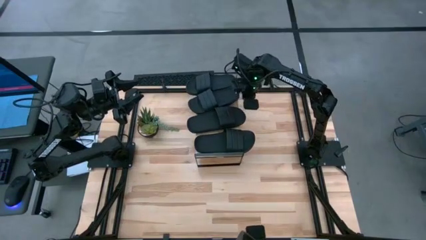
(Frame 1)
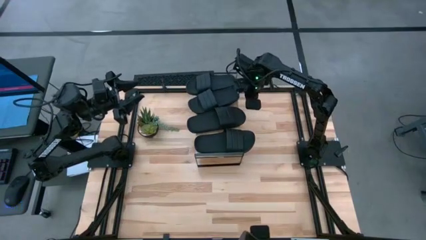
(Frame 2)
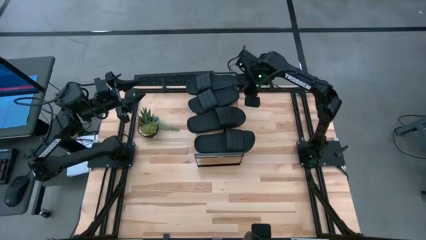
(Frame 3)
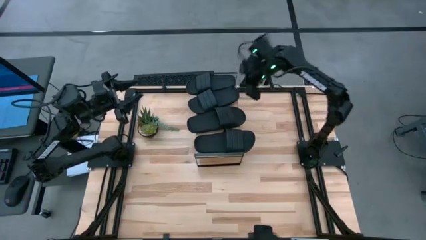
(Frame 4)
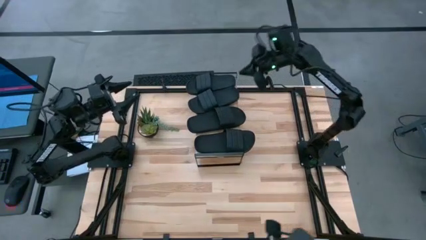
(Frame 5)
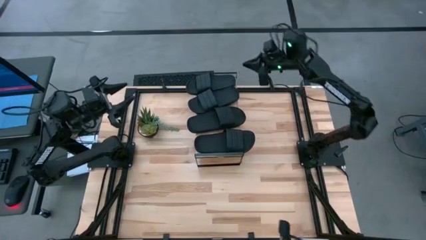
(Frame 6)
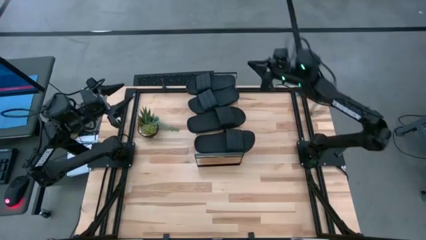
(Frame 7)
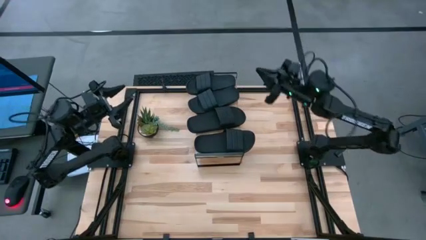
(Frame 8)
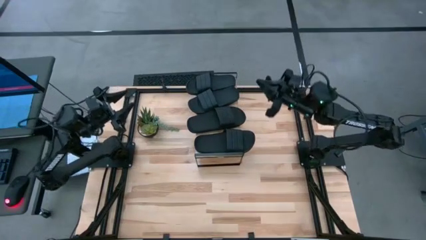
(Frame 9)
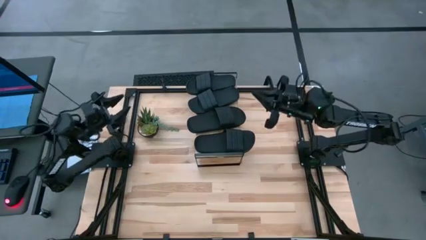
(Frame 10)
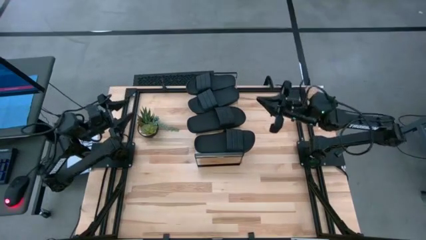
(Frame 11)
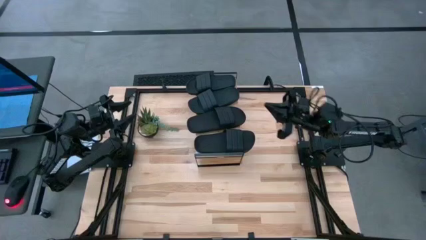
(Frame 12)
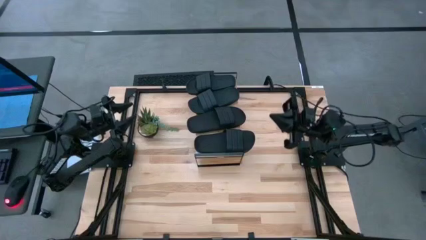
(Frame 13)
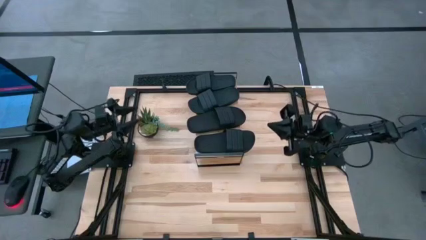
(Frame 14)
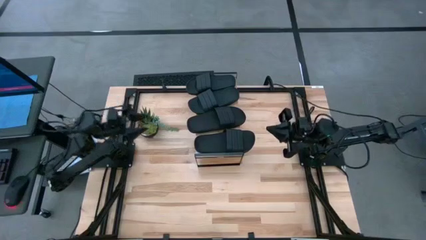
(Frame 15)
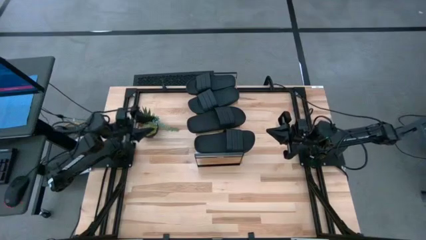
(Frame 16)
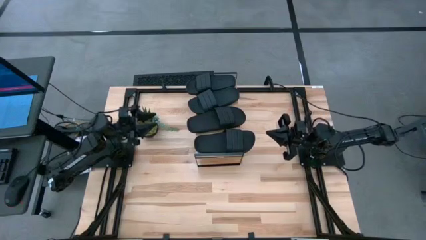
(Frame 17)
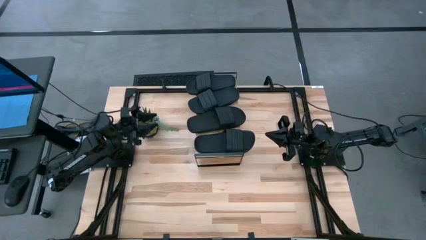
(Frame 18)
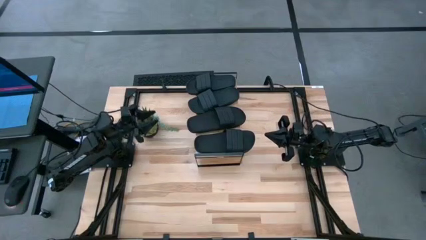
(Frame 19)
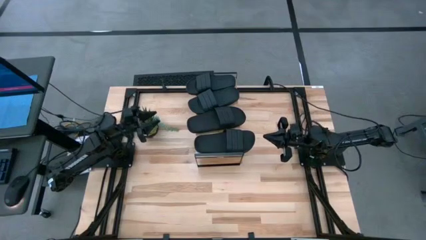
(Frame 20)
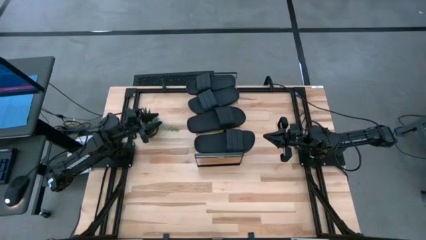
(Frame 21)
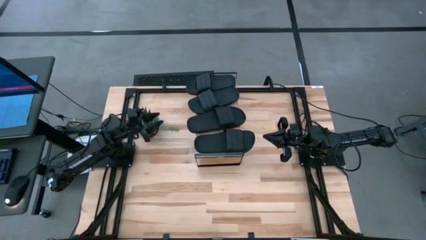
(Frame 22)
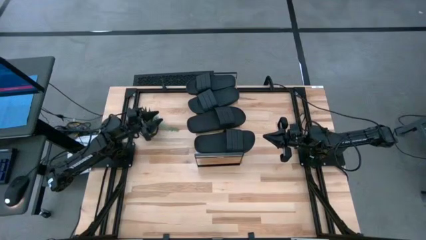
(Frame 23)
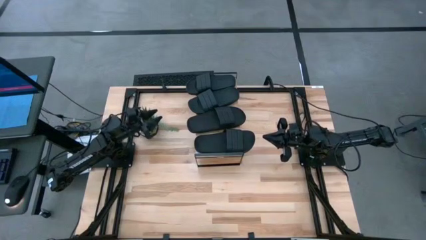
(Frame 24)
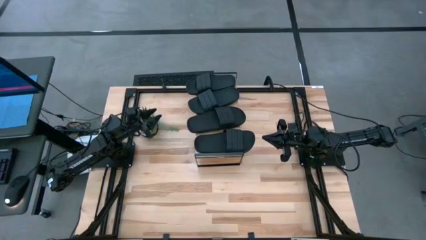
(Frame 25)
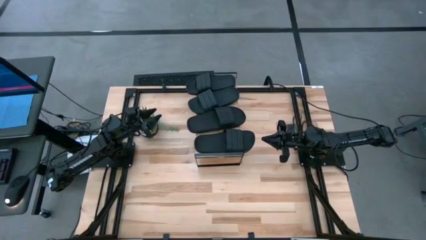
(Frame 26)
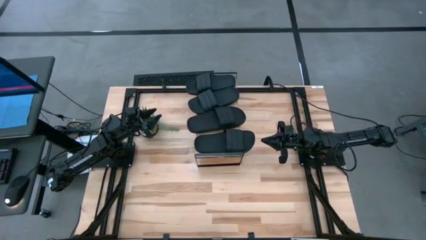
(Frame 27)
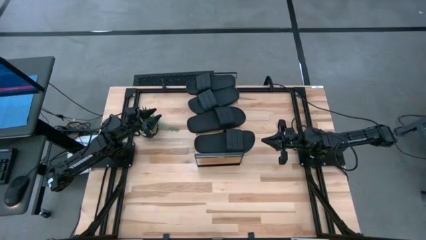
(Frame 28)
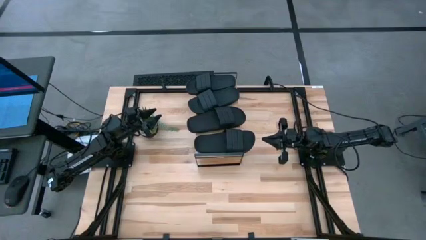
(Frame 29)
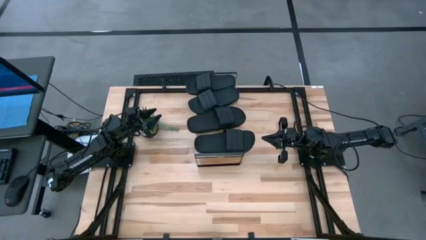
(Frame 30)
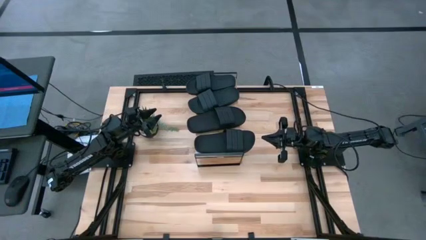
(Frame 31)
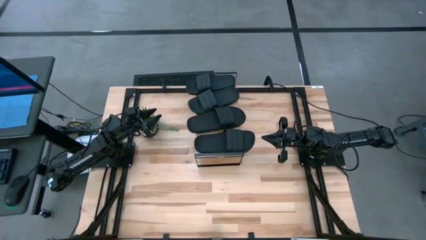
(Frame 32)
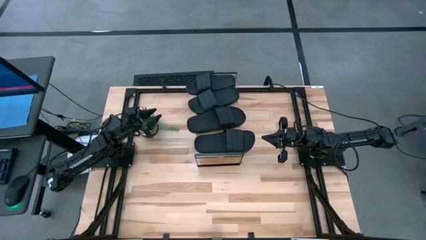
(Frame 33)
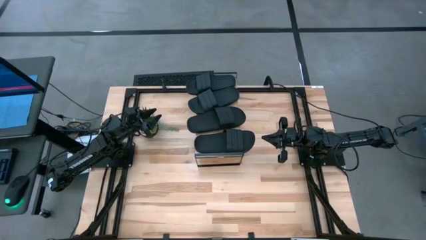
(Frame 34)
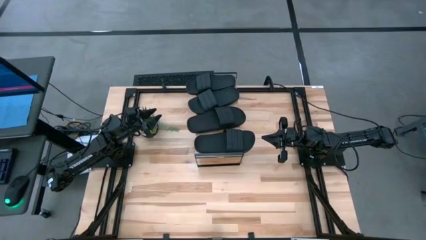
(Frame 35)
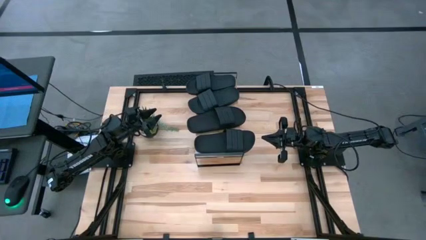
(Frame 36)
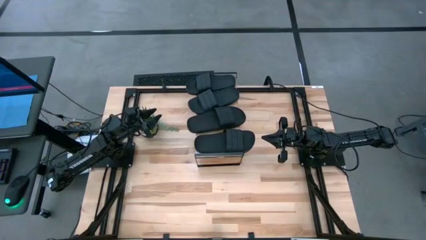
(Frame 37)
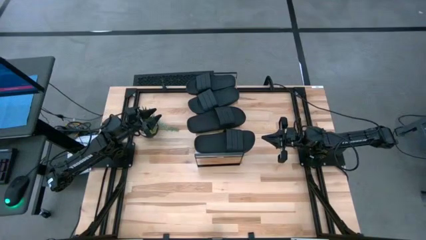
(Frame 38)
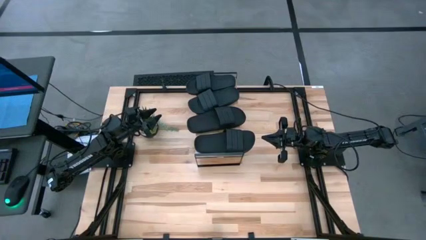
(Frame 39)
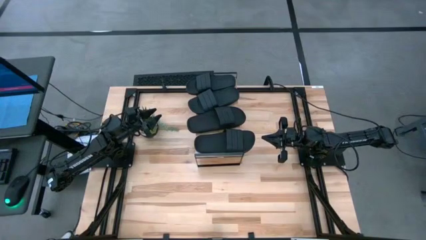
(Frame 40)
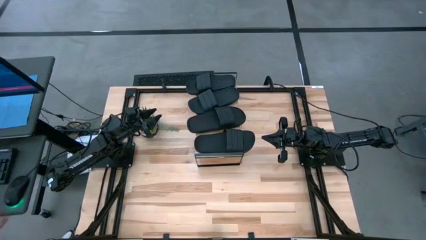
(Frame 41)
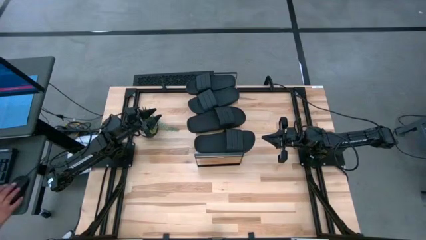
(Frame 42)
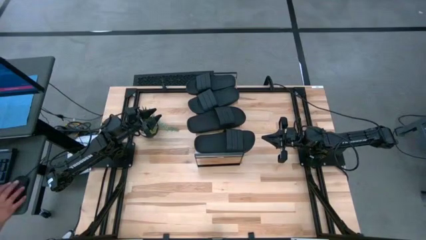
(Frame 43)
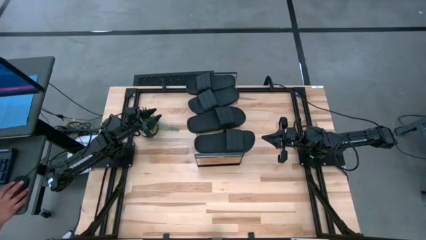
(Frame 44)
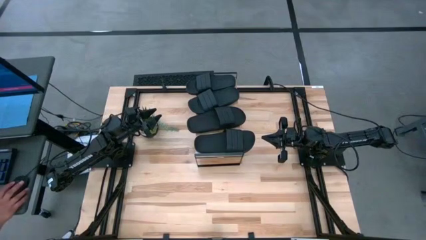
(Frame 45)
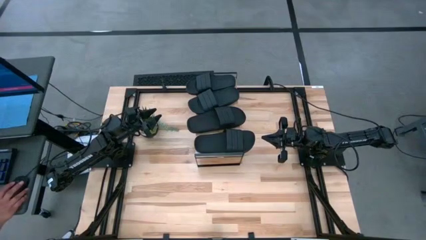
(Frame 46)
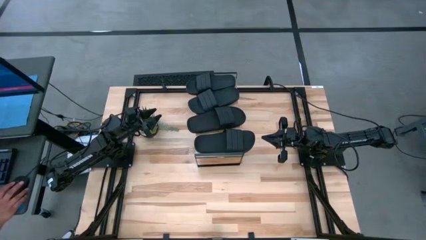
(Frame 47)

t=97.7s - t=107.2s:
Task: Pick and place slides into the shelf
Return to Home Position

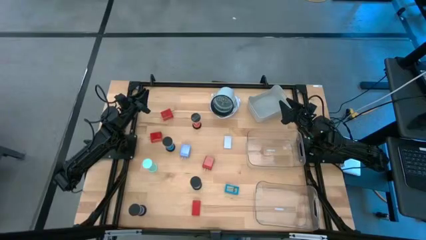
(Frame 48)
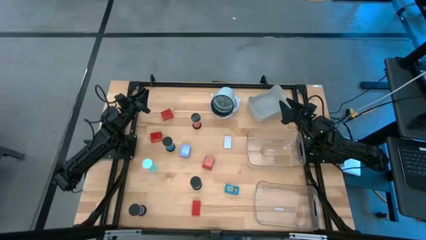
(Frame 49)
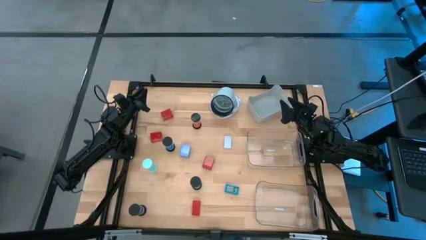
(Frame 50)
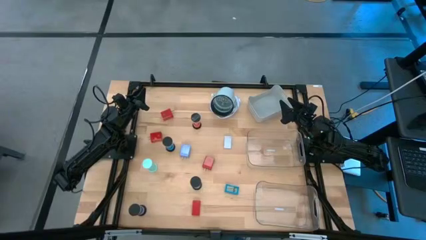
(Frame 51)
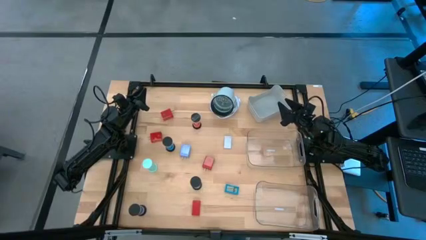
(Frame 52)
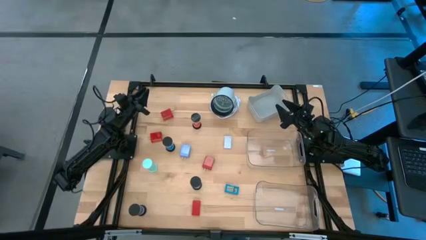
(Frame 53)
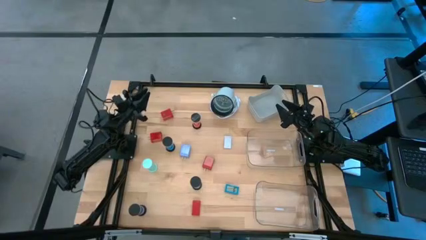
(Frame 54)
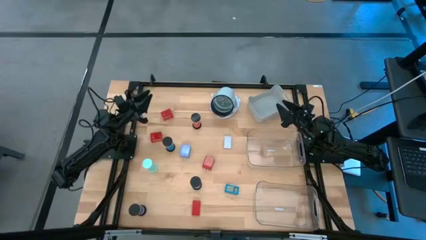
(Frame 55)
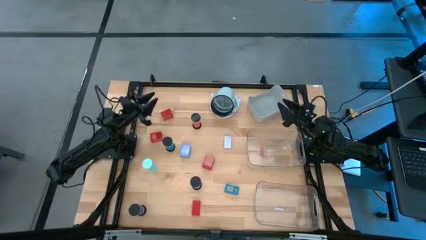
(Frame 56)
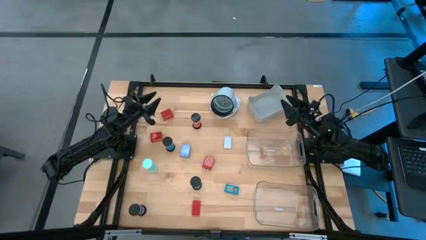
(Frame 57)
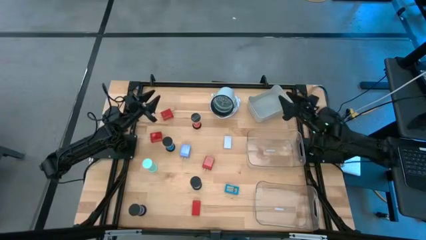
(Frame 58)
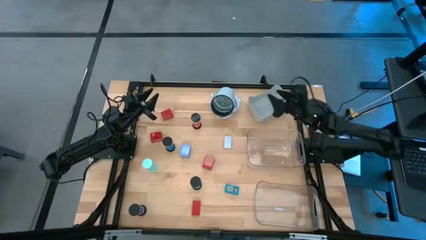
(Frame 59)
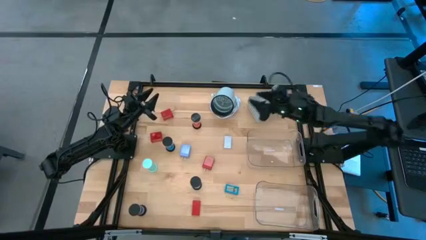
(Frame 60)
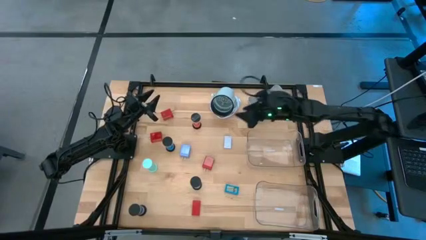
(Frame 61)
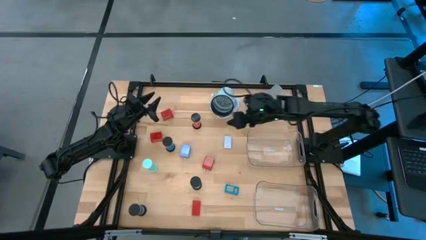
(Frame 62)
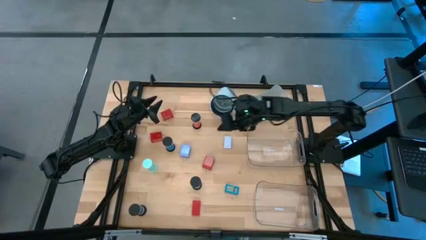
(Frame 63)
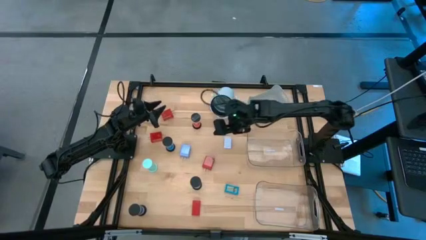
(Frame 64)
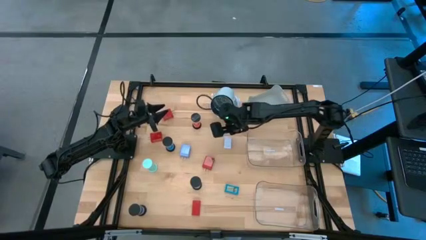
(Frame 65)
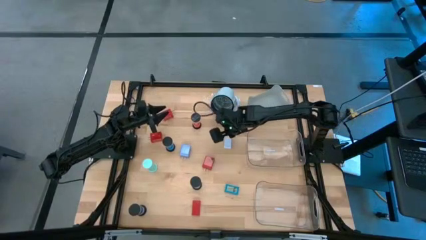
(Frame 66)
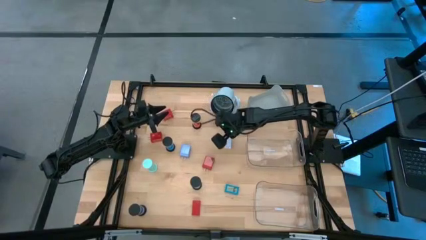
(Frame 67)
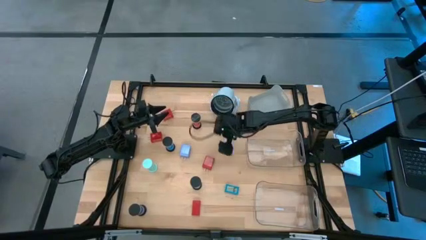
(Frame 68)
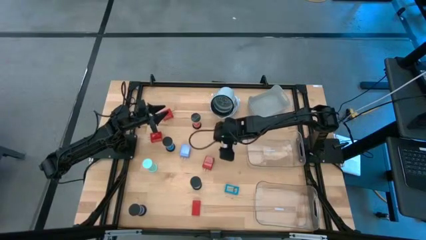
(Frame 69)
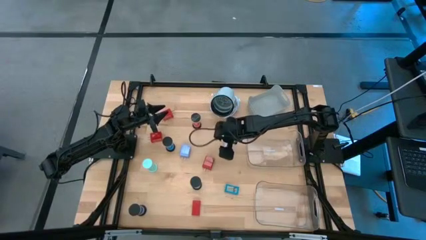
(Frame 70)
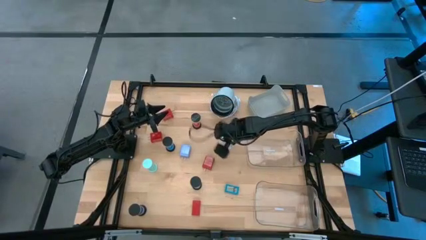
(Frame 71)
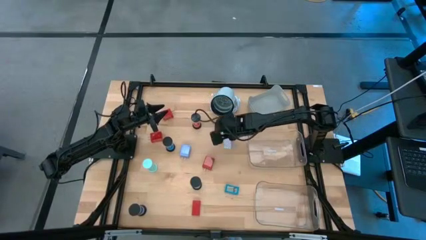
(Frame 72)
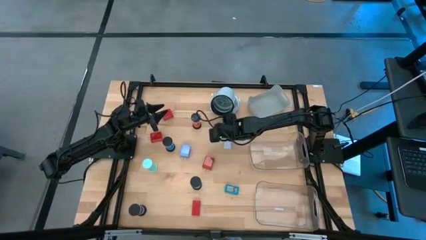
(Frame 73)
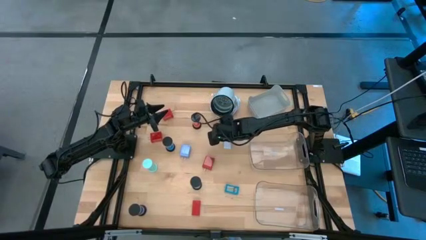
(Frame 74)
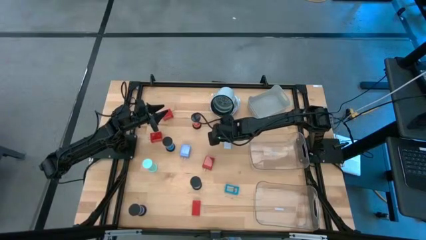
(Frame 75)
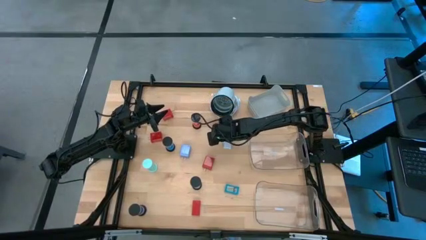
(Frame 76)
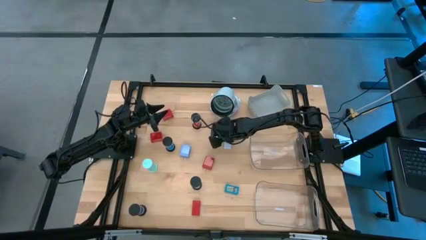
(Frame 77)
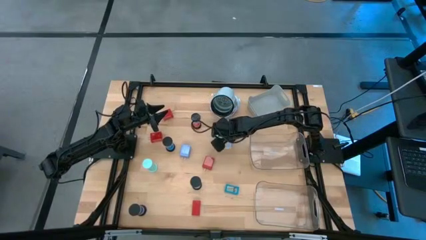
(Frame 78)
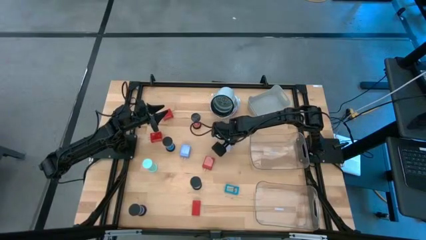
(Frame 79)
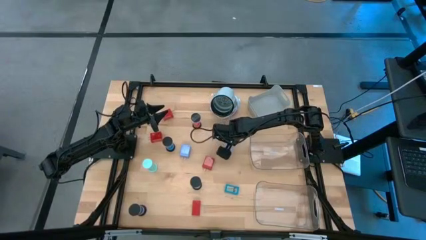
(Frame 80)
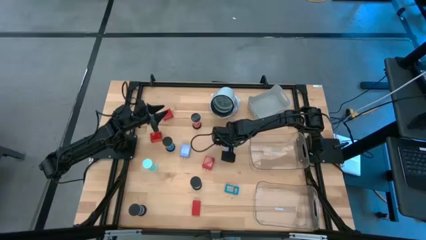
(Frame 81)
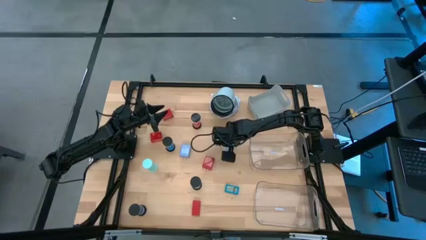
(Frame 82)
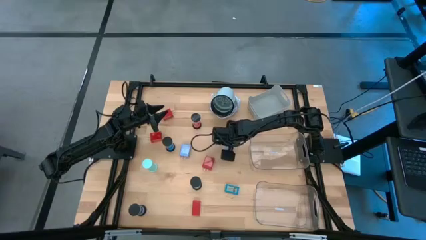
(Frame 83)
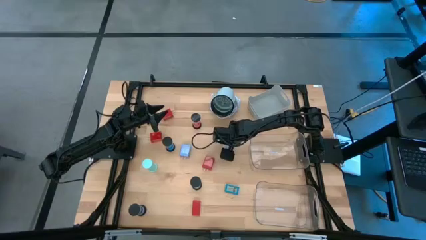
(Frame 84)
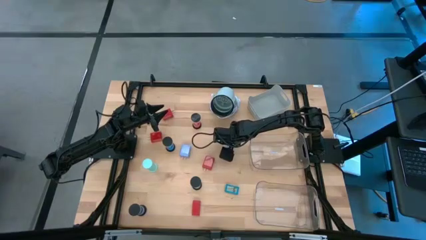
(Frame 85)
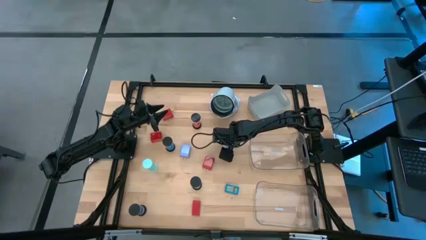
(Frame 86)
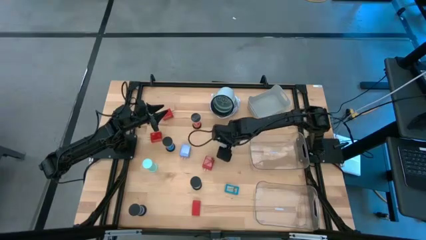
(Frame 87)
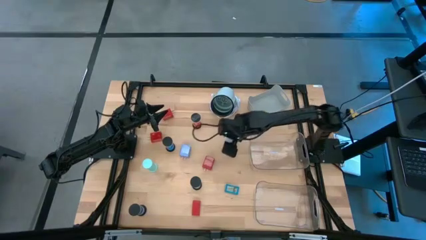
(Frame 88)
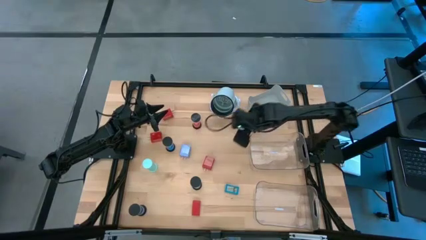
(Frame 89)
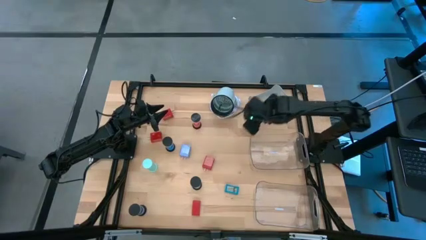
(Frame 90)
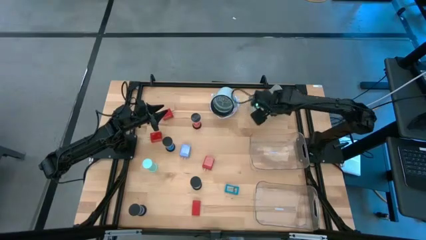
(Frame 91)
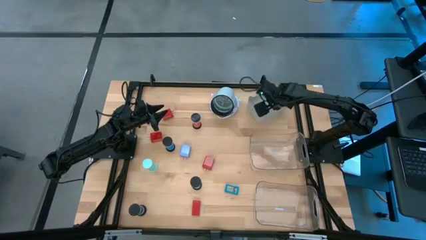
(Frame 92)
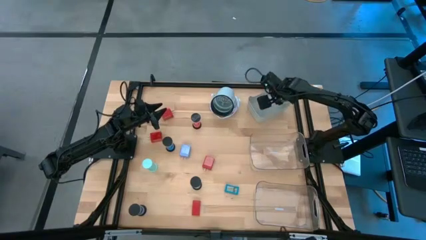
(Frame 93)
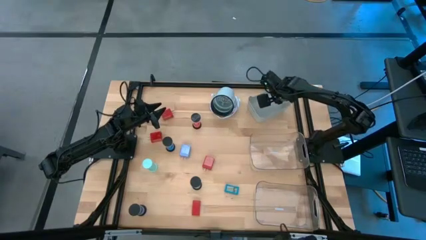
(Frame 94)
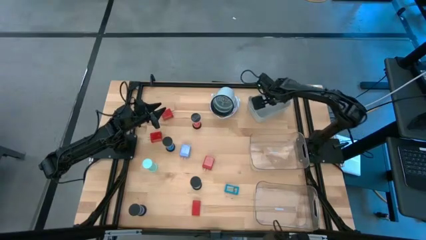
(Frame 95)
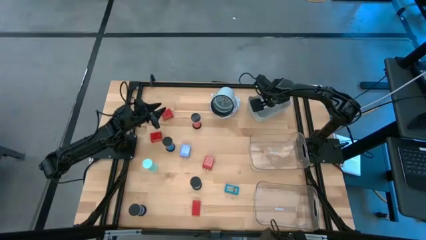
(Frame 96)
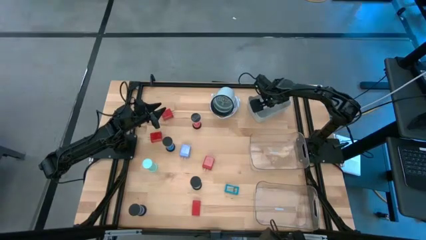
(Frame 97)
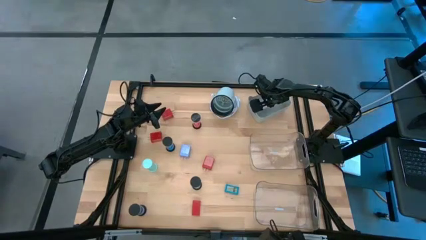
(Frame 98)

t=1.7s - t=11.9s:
Task: Pick & Place Office items
Put the white digital clock into the gray bin
